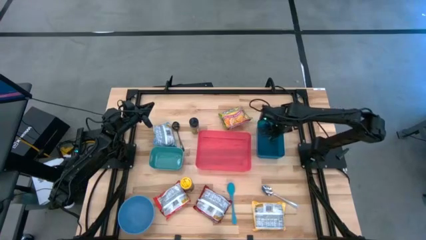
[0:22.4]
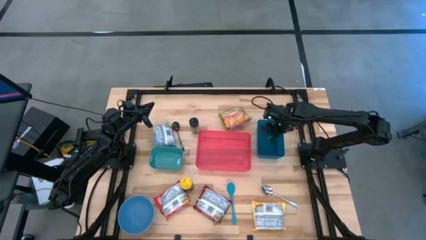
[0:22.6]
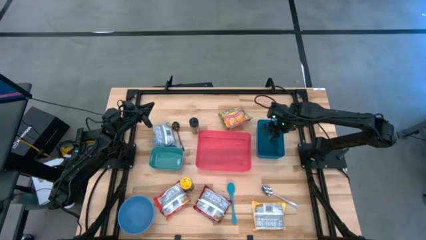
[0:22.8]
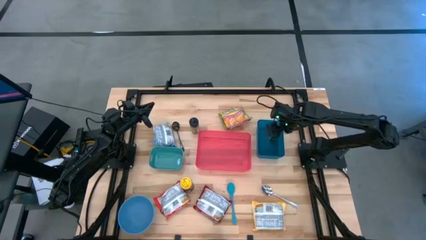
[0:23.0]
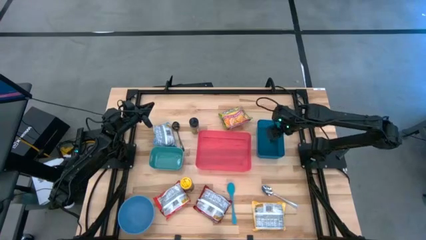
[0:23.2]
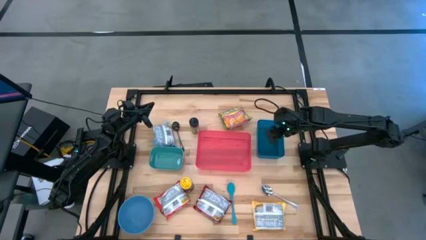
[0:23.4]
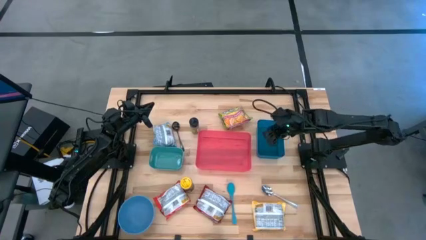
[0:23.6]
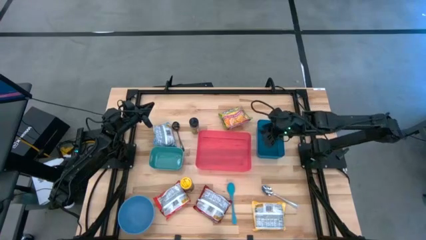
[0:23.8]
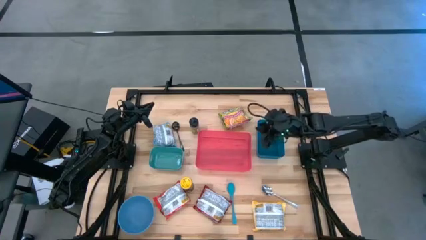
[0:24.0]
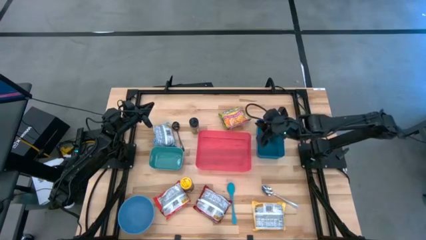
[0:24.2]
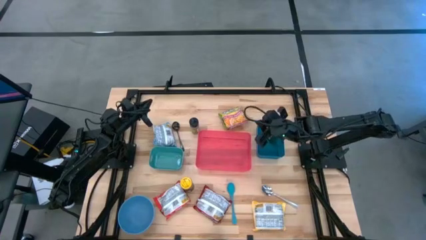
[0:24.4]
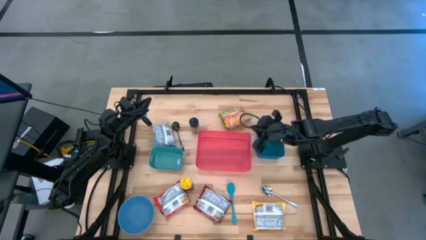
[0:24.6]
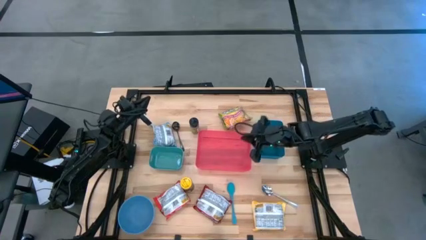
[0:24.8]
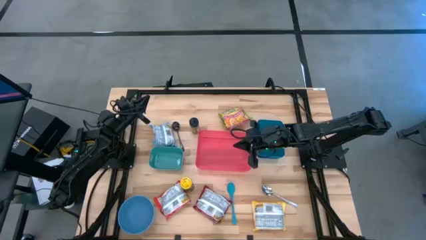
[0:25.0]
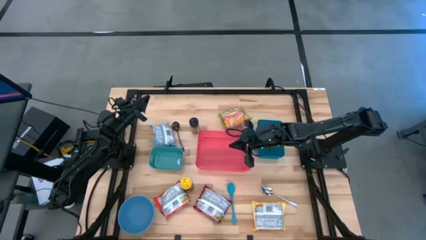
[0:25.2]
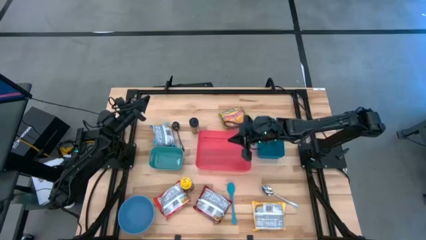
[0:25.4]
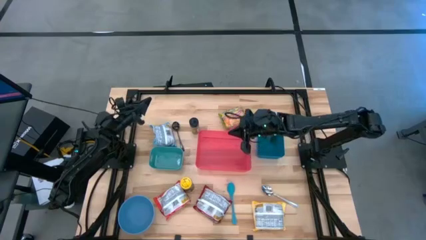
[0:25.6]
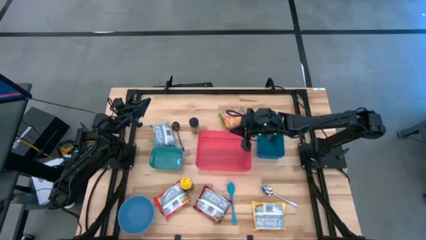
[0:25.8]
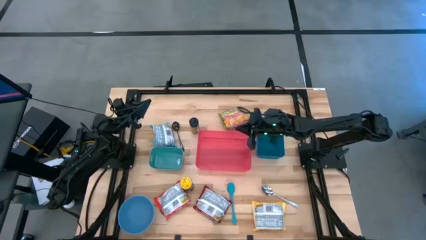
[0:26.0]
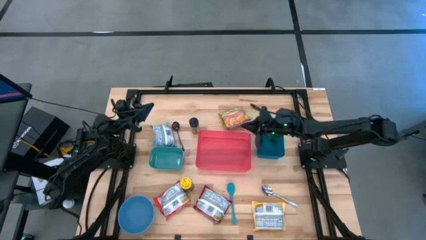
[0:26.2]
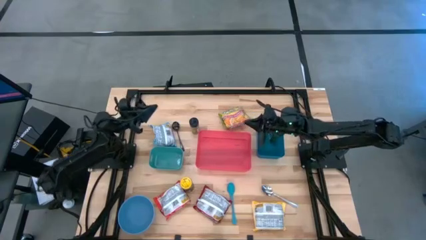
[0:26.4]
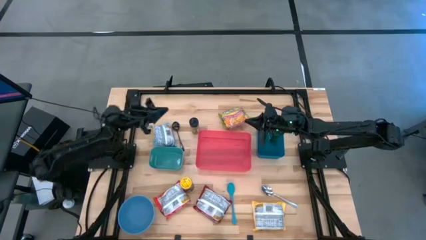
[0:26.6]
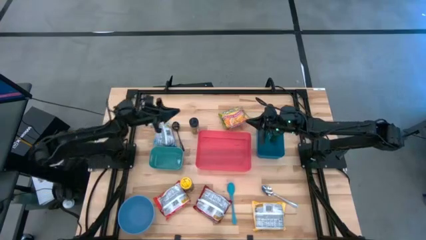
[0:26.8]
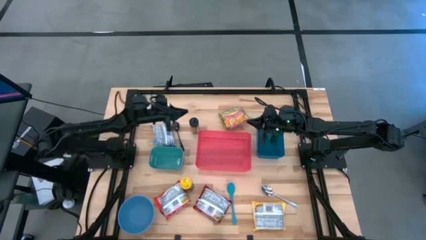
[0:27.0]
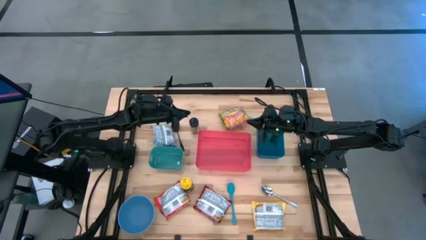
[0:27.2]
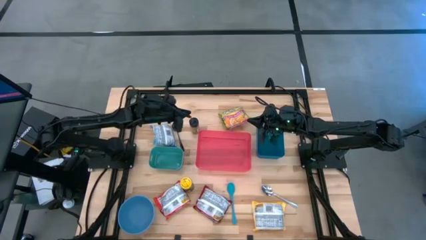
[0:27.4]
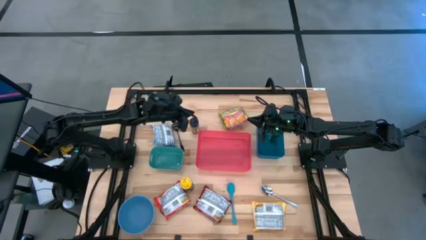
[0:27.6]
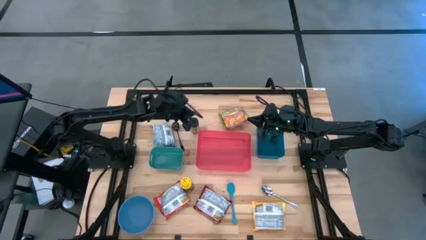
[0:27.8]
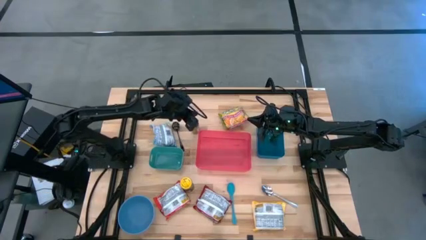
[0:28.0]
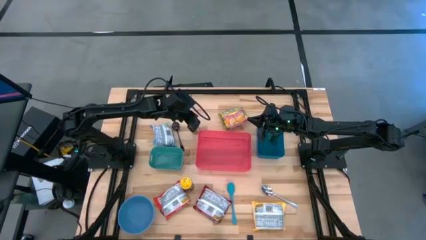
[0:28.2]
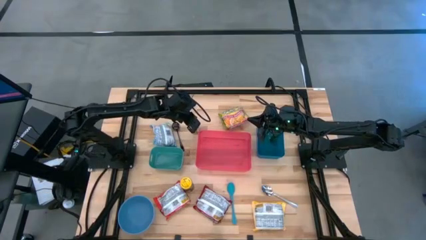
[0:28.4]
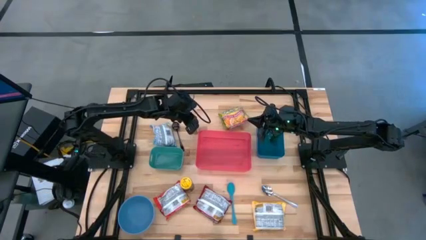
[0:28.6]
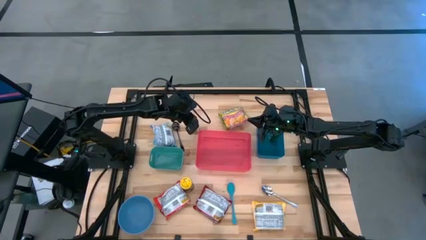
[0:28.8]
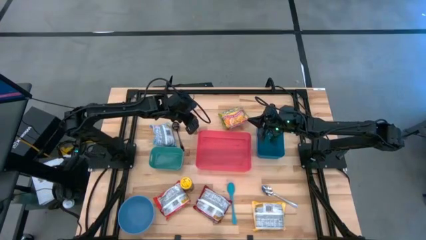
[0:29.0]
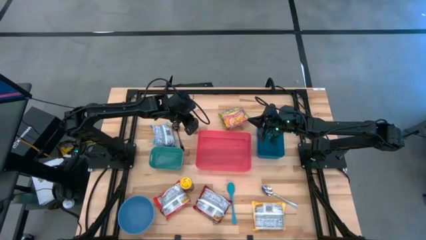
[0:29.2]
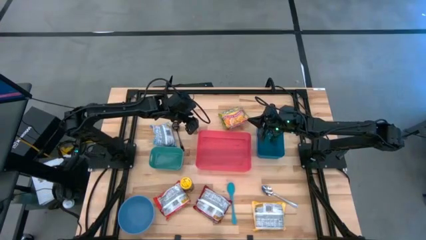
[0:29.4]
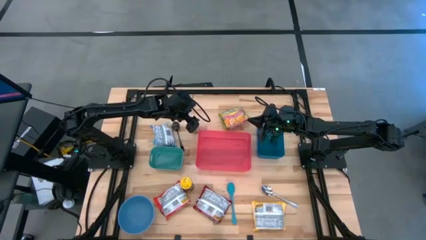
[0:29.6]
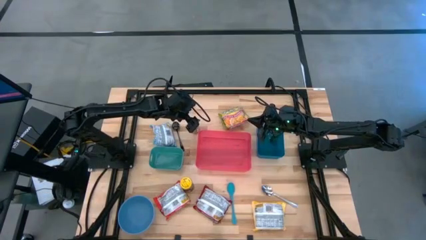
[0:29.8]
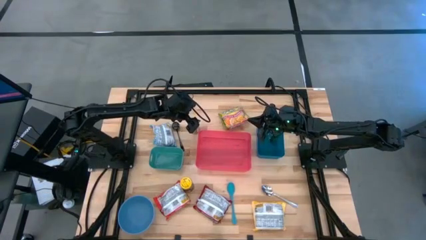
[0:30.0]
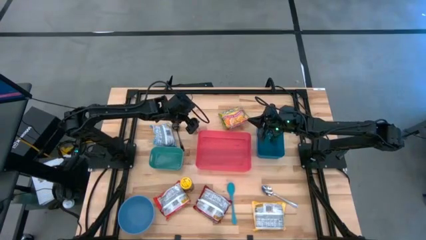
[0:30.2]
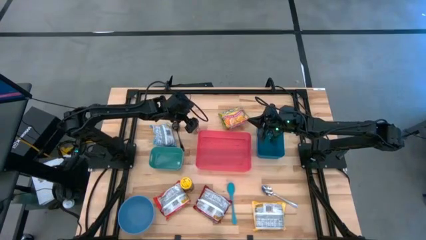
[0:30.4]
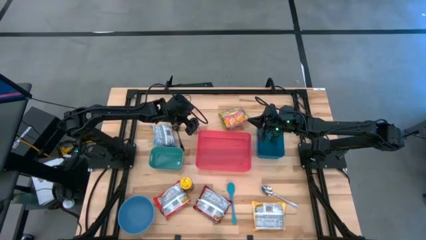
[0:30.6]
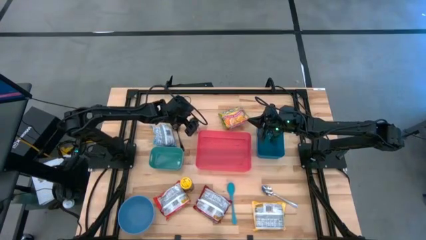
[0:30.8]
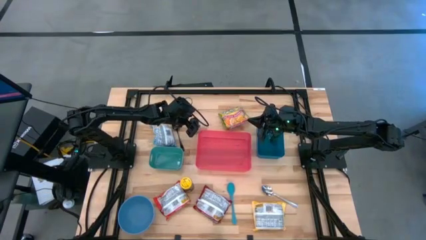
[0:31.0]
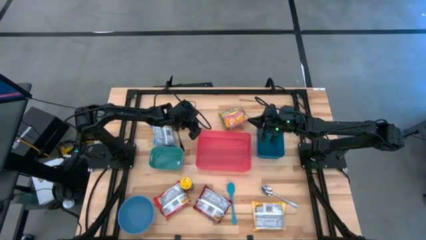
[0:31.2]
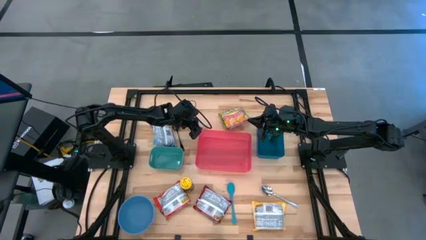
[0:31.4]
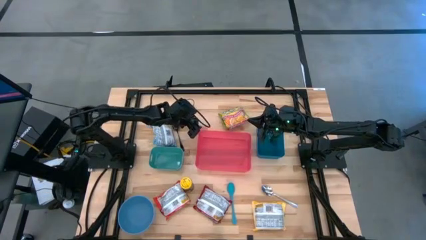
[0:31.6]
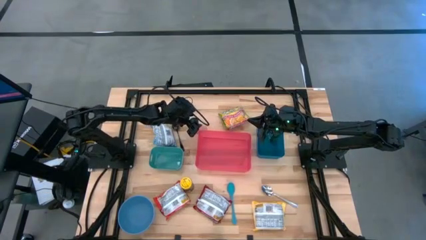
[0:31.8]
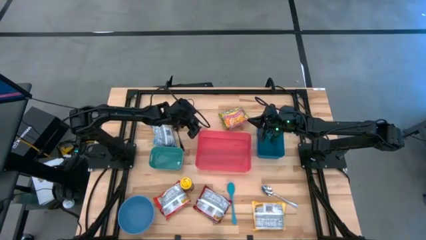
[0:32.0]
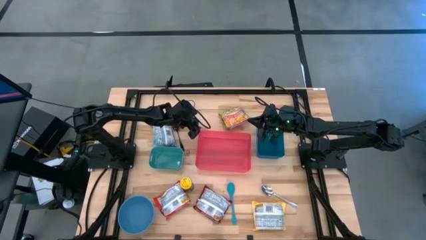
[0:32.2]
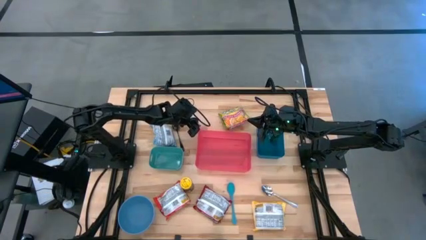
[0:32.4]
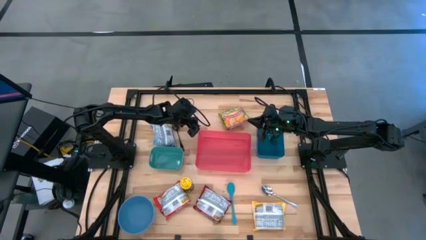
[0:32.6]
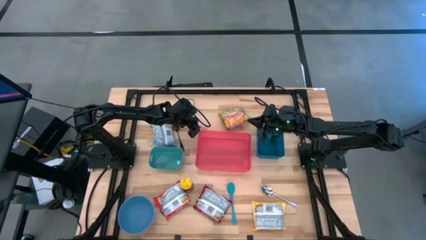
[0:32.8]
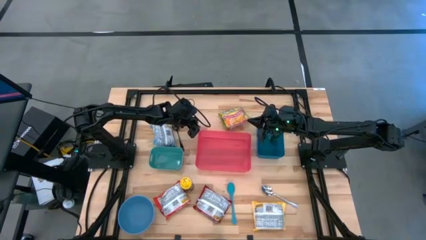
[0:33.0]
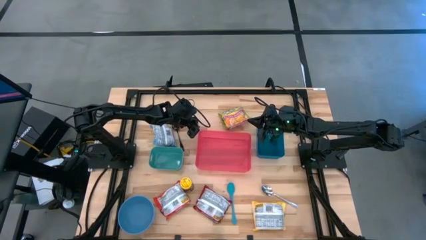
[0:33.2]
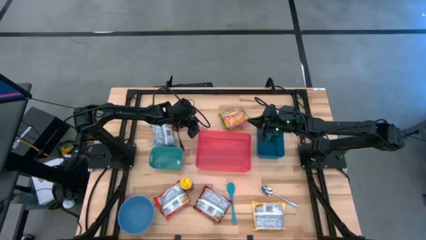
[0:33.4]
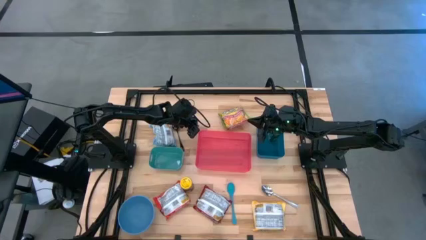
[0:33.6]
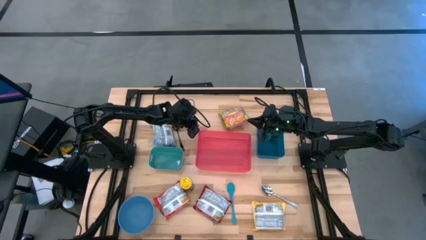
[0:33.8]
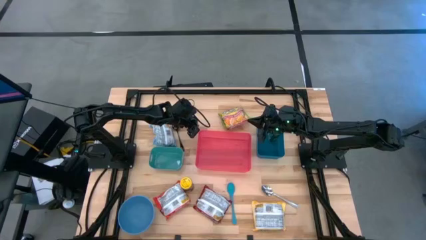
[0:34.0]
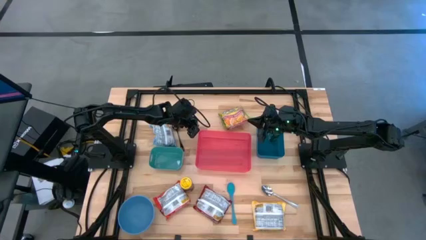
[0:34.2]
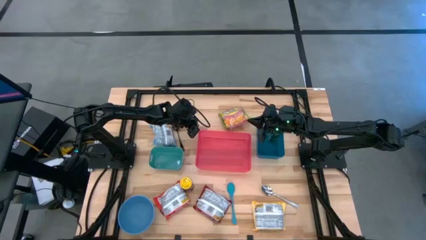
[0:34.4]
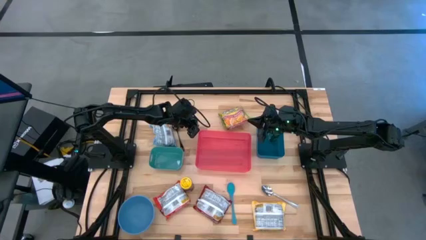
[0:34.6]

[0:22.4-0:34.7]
Task: Pick & Place Food Item
Put the black seasoning bottle into the blue bin

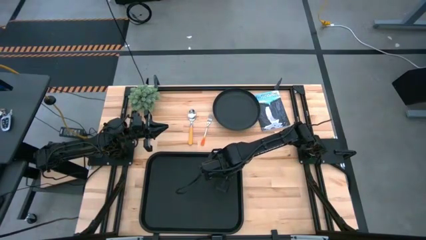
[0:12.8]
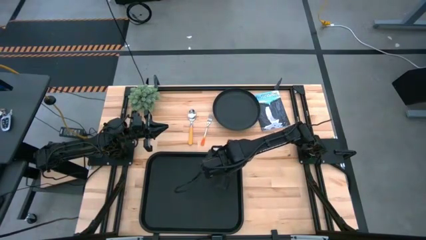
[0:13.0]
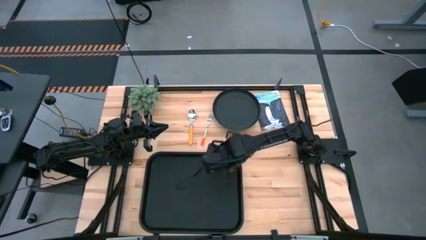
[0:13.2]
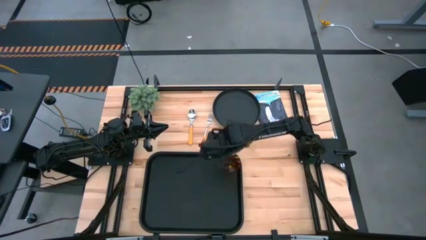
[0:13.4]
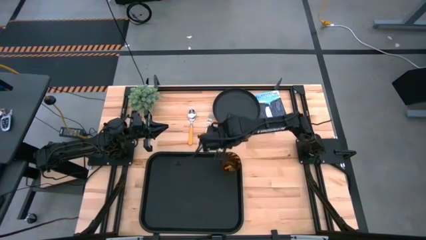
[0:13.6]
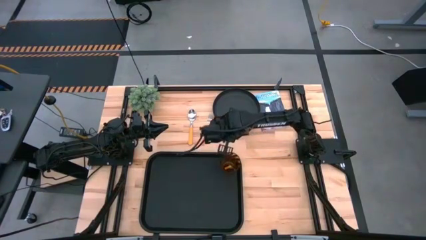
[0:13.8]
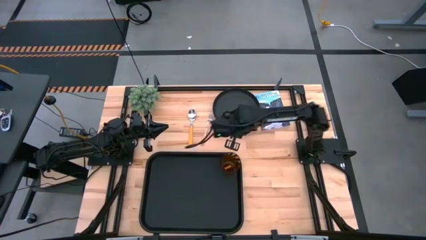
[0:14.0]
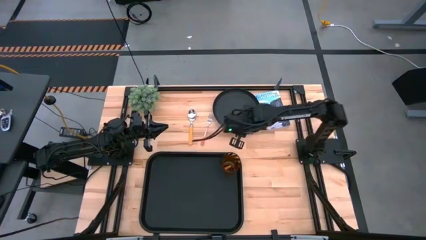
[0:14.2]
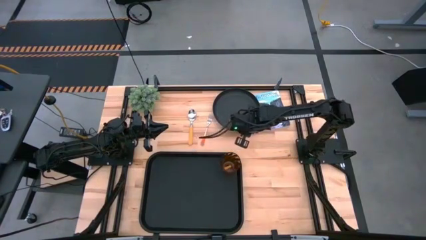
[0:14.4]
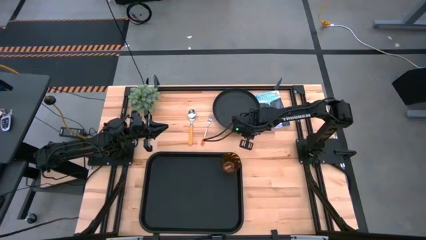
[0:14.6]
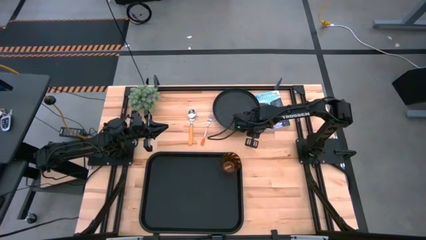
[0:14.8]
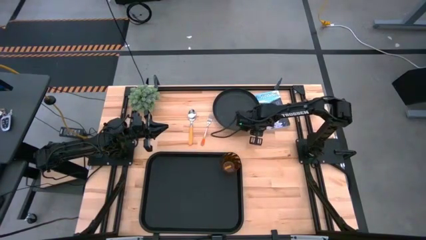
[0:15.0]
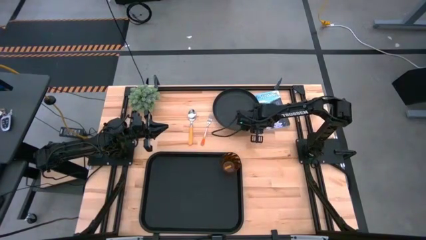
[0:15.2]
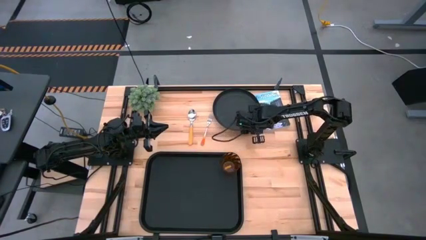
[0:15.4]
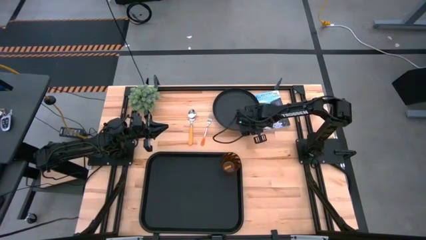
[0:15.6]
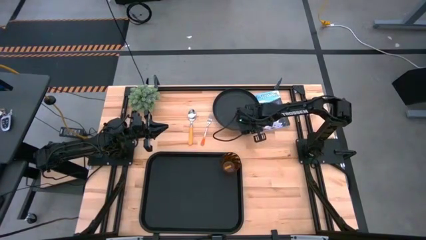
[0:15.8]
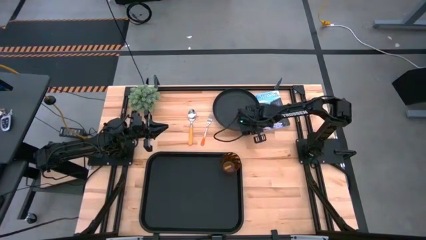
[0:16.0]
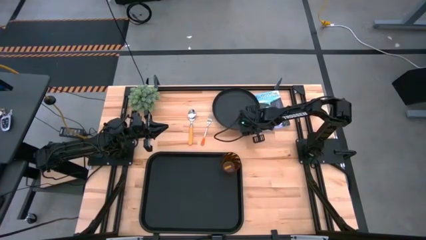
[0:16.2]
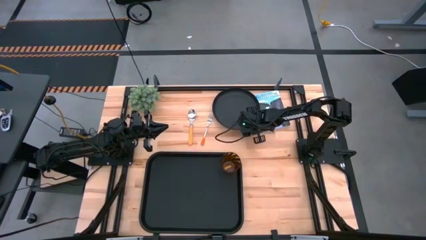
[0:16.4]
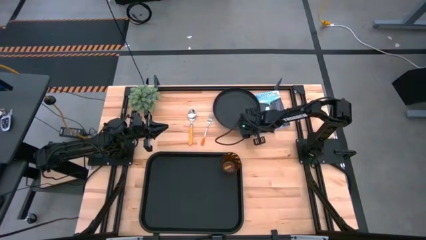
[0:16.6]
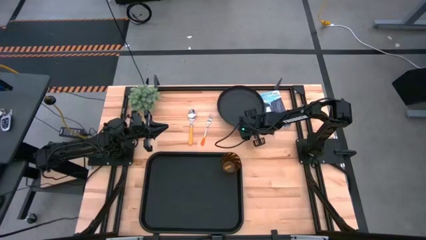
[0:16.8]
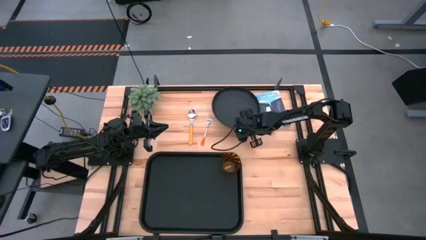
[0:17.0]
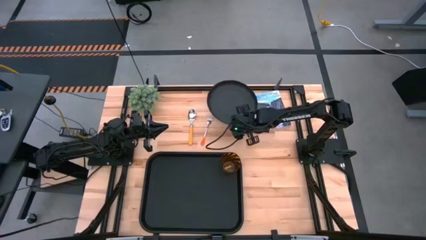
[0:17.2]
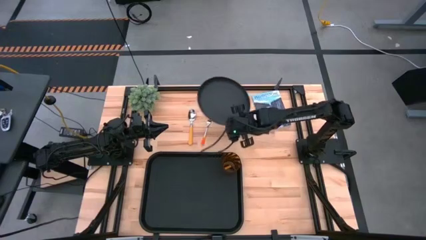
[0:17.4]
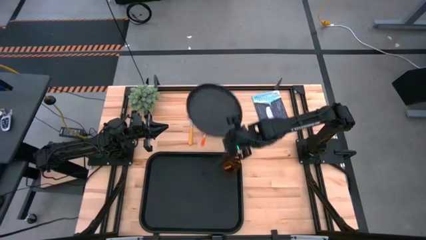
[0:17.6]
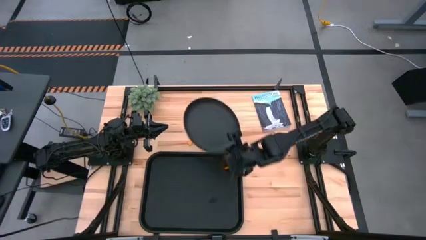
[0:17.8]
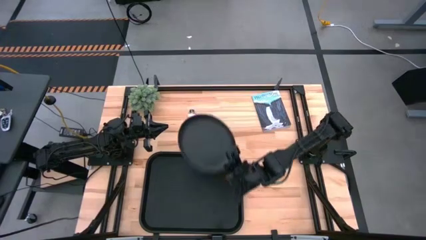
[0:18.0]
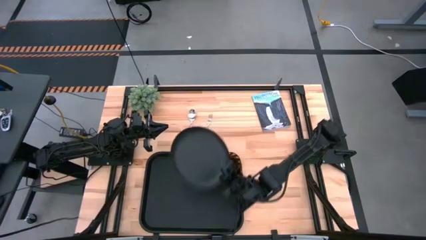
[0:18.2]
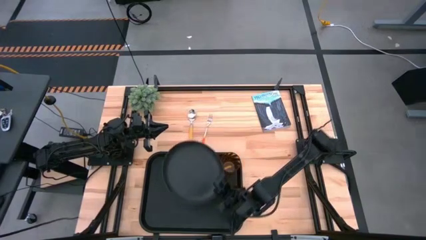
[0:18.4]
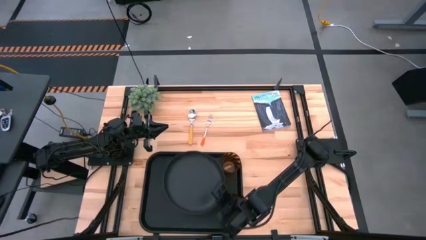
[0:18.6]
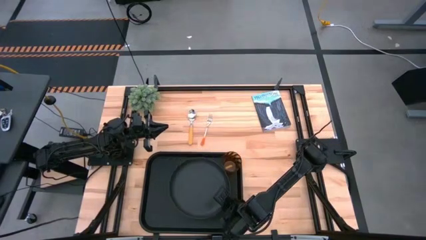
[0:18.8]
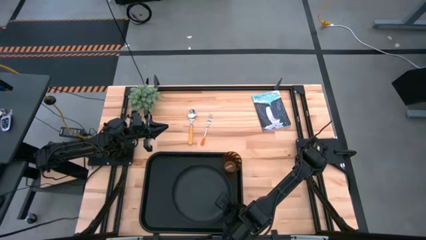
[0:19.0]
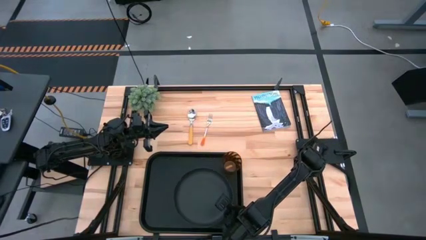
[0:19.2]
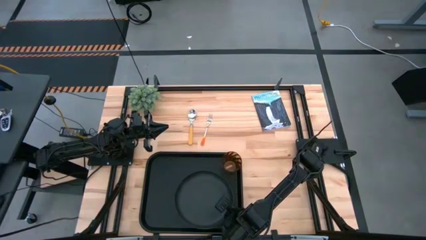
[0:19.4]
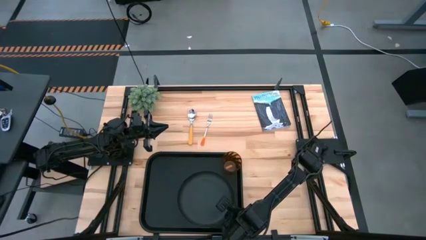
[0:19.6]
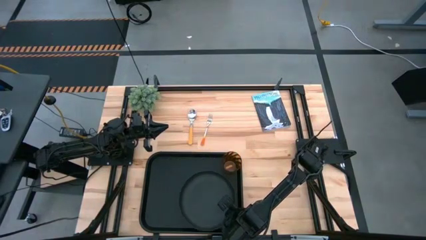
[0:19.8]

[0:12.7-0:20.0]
Task: Pick and place plate/cup/fork/spoon on tray
Put the black plate on the right of the black serving tray
